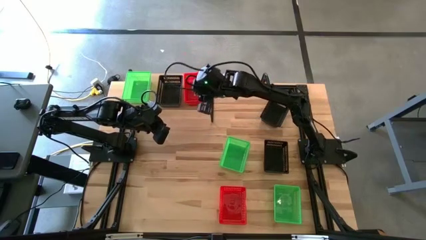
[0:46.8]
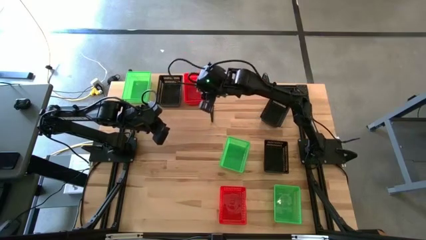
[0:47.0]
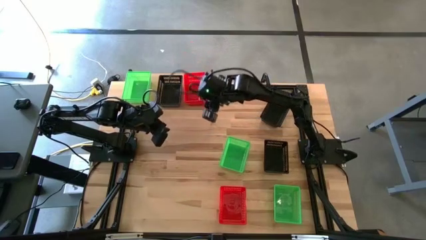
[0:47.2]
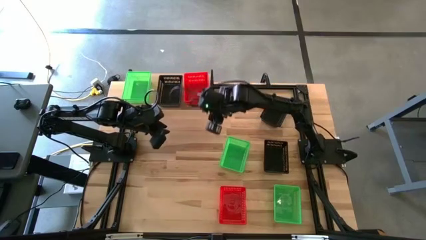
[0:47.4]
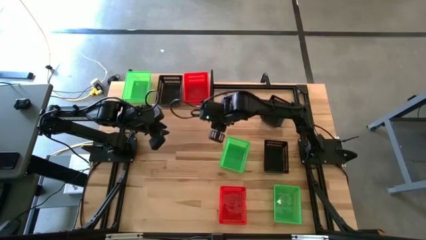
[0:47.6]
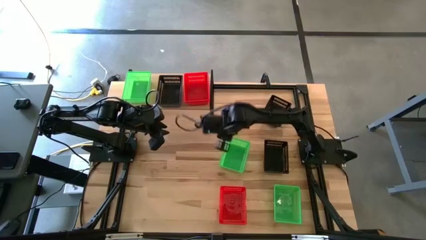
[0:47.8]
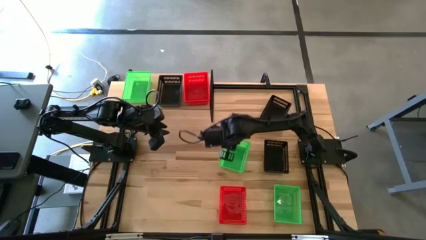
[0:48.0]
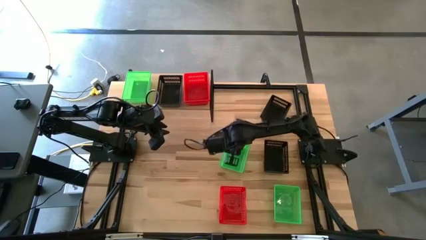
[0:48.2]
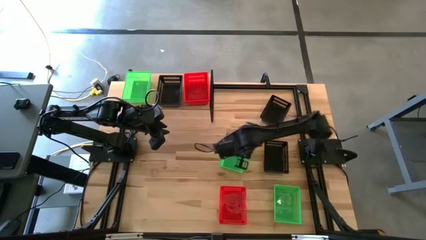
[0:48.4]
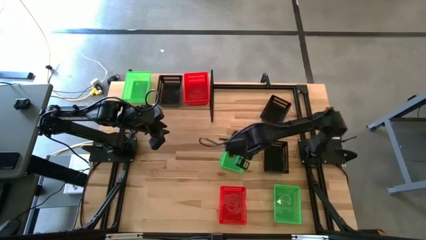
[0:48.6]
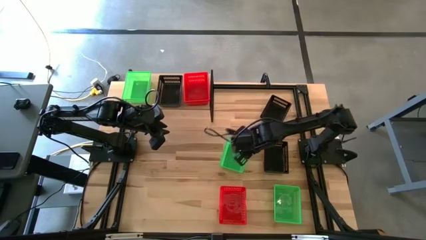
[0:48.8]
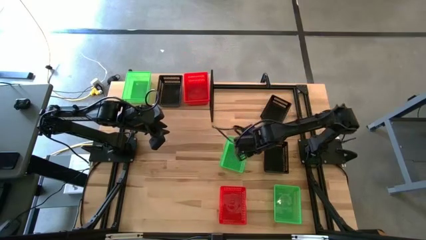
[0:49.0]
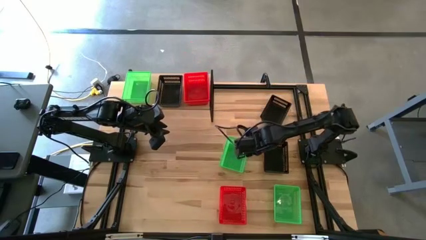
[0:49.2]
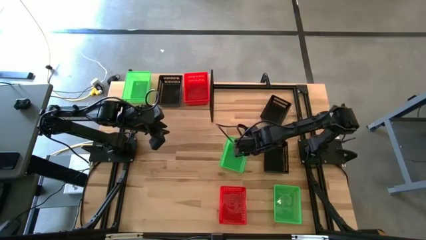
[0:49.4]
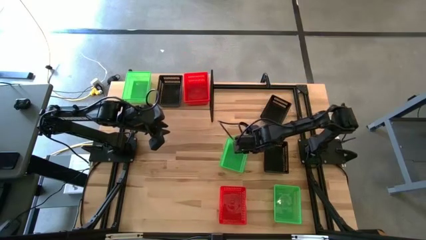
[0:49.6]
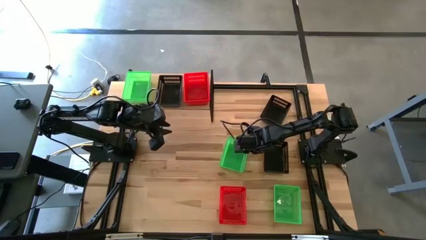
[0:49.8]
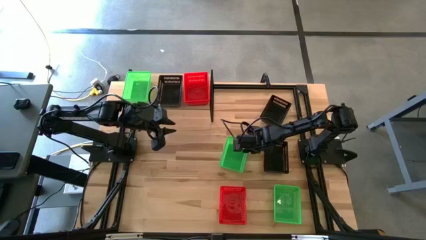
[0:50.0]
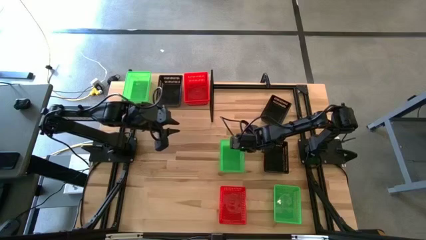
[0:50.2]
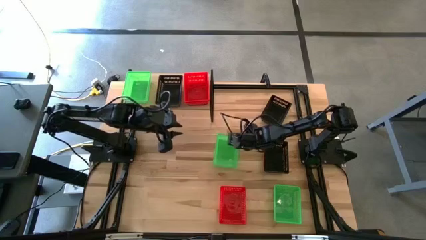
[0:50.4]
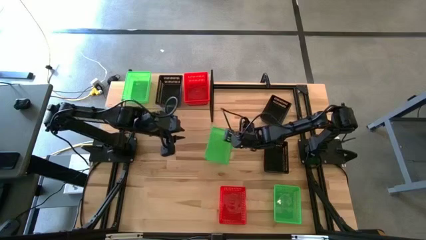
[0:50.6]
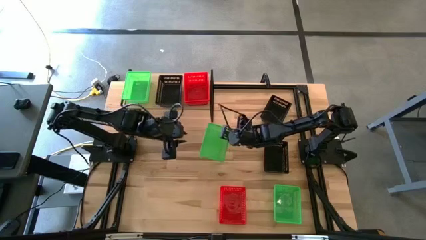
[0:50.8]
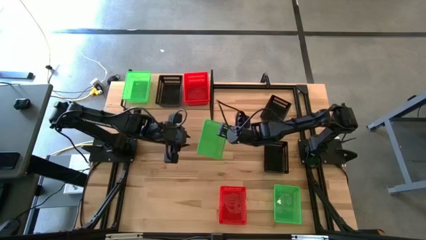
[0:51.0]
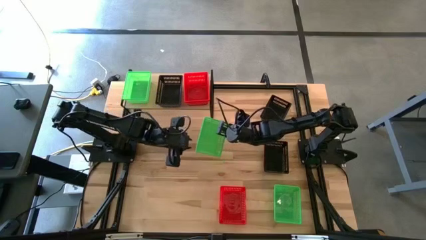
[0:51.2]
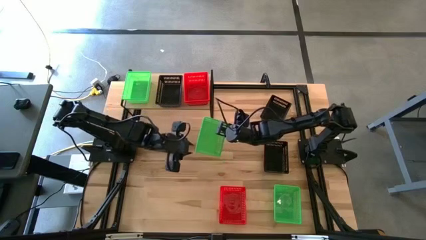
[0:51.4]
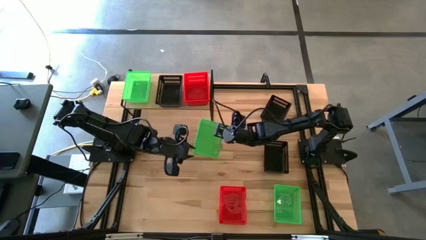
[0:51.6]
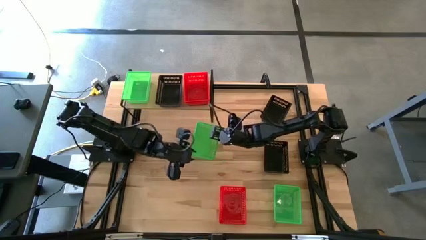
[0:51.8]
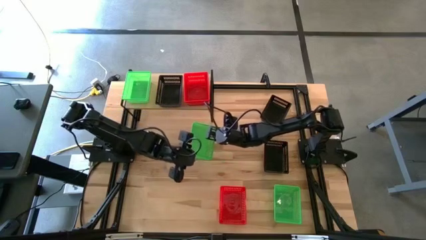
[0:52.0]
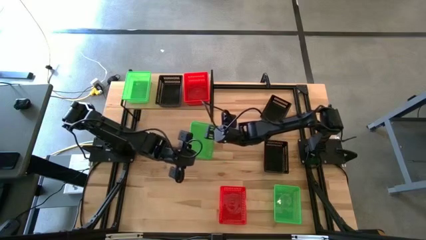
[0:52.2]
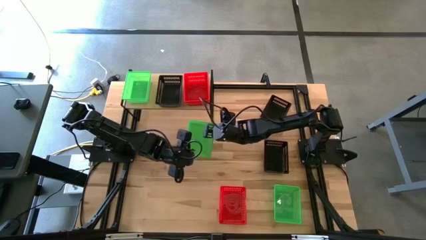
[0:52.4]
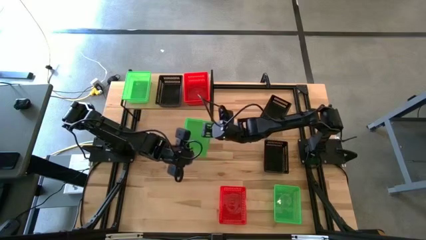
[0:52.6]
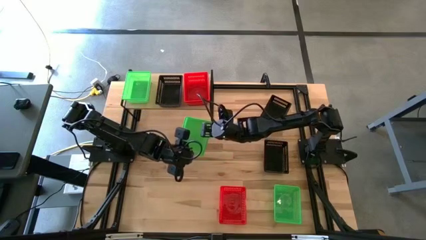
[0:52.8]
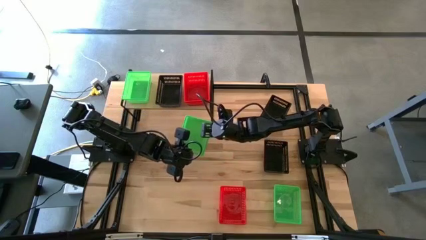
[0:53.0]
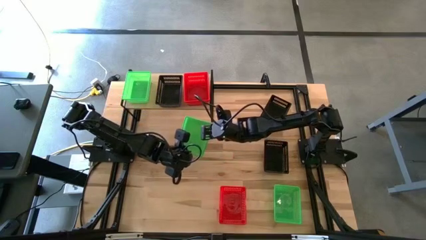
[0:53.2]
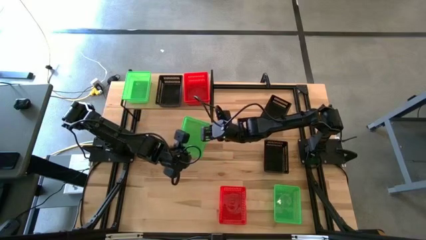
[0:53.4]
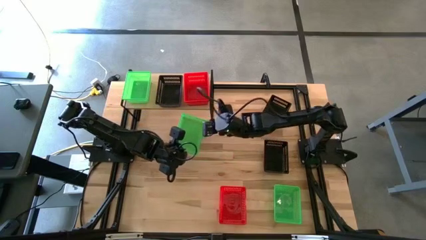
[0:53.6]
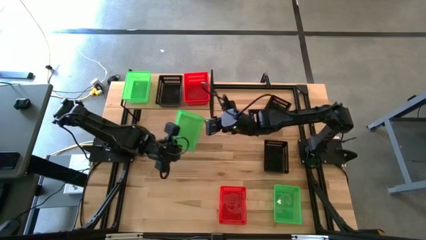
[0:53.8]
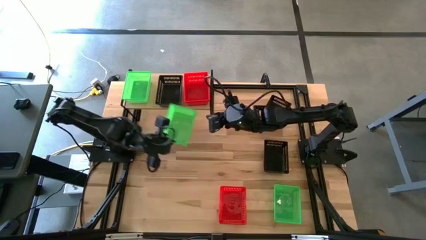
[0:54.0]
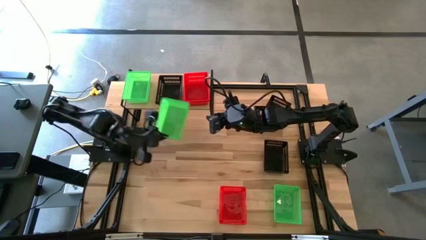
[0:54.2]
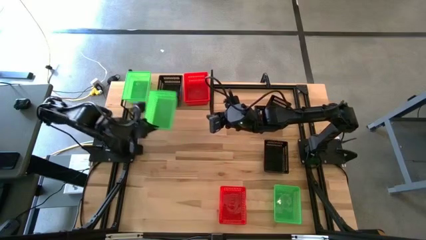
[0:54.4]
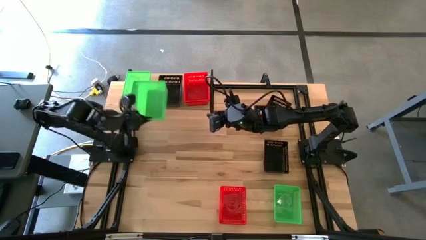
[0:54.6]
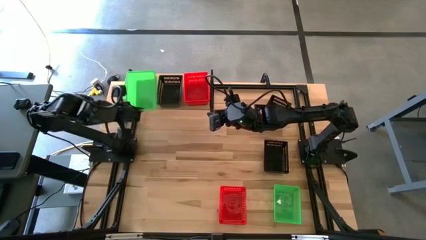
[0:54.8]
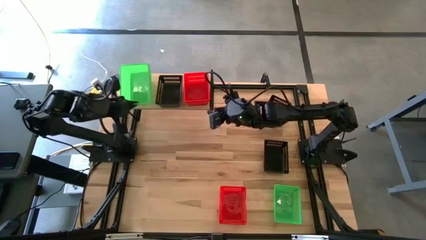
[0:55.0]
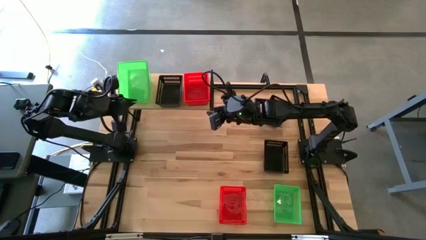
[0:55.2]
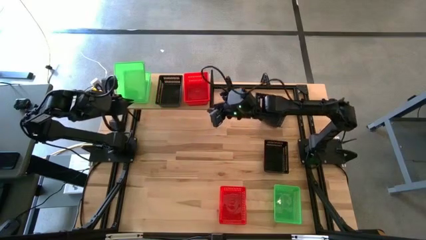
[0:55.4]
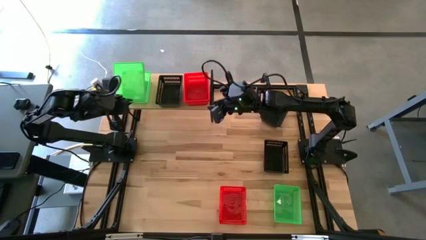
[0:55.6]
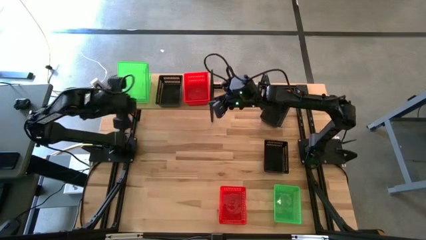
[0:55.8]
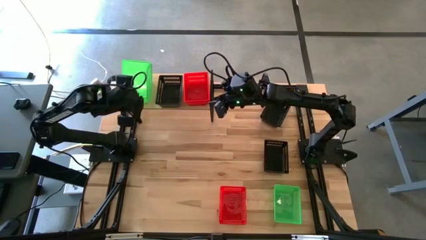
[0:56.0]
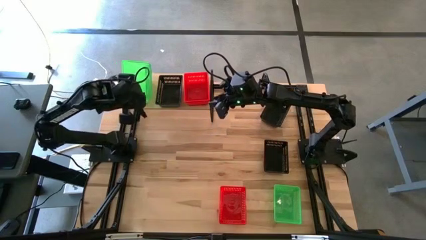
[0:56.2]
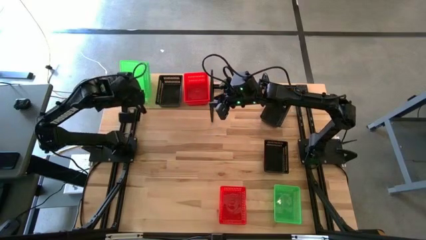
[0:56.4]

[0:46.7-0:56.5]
Task: Stack baskets on shelf by color
Stack the left green bin on top of the green bin on the shelf

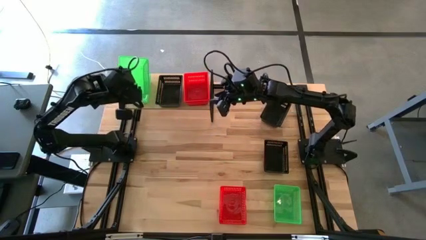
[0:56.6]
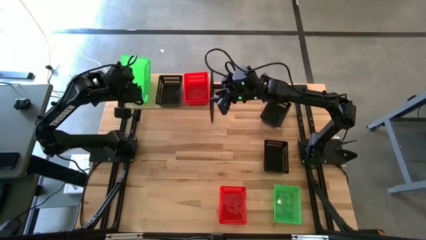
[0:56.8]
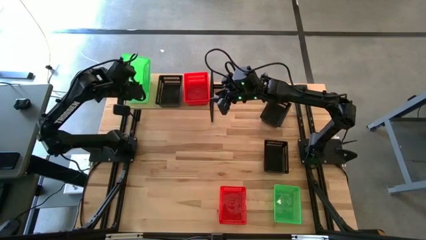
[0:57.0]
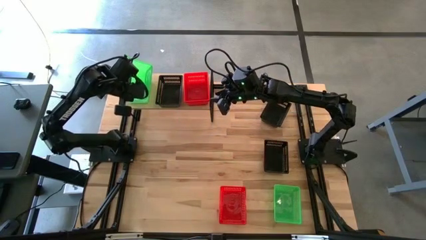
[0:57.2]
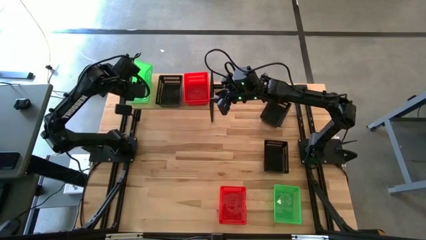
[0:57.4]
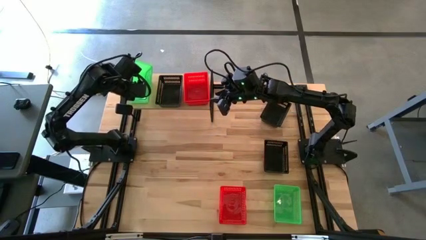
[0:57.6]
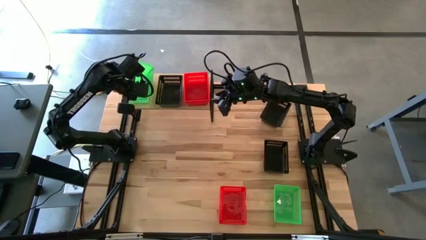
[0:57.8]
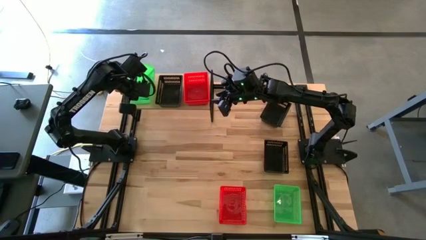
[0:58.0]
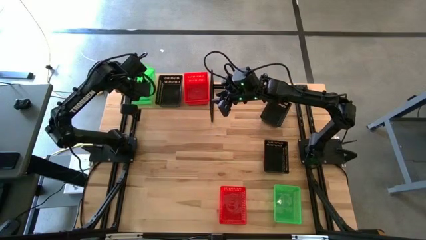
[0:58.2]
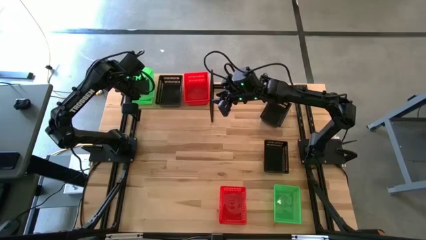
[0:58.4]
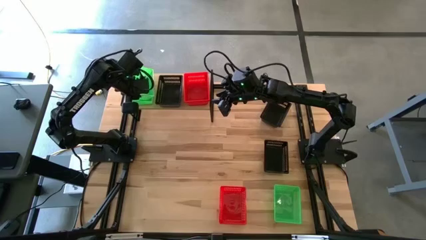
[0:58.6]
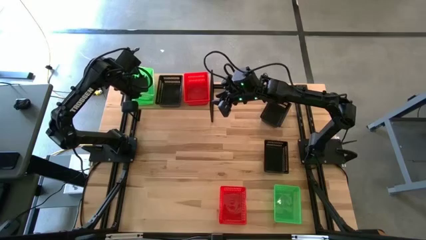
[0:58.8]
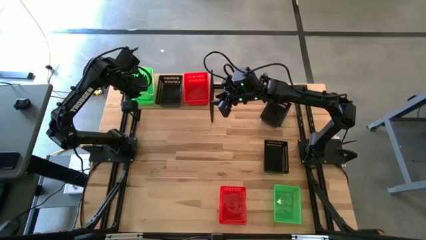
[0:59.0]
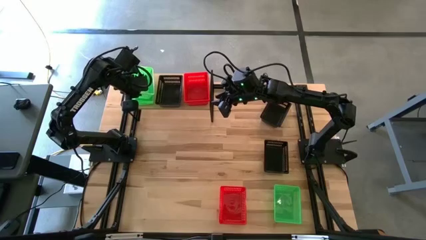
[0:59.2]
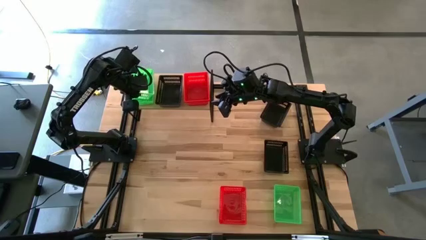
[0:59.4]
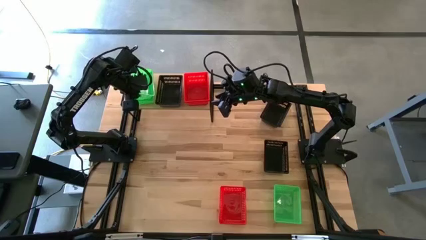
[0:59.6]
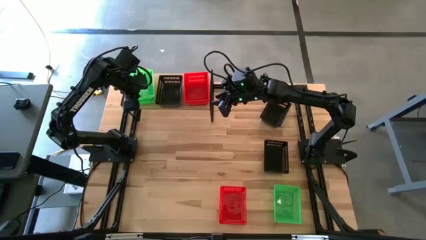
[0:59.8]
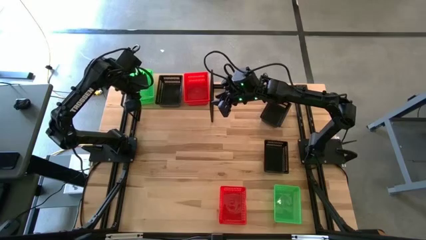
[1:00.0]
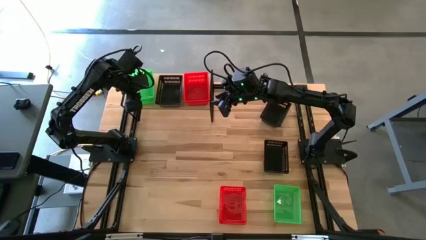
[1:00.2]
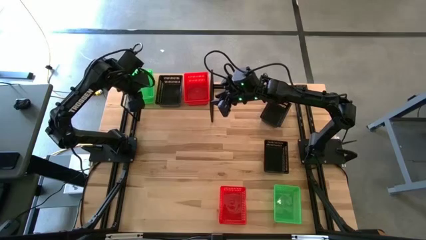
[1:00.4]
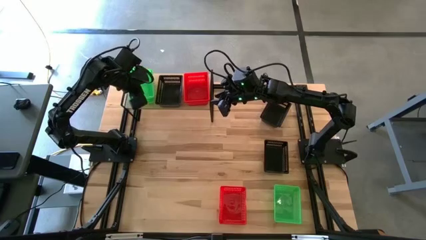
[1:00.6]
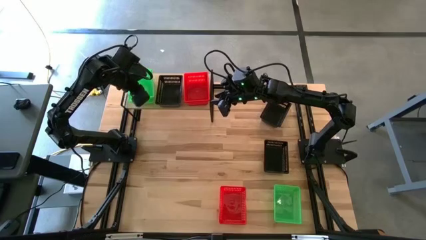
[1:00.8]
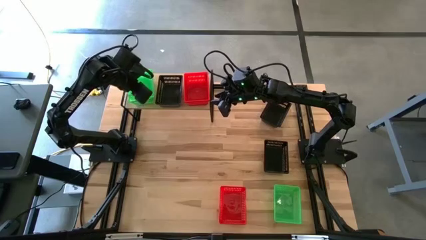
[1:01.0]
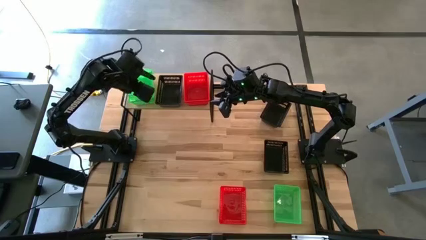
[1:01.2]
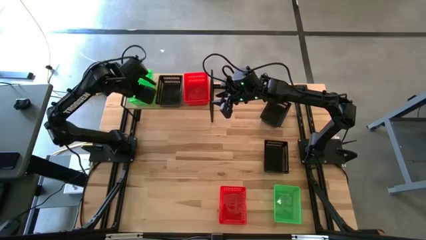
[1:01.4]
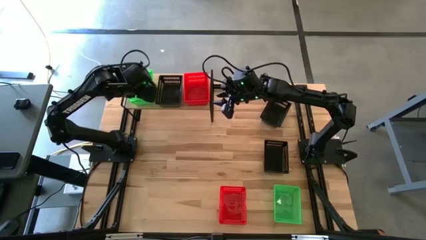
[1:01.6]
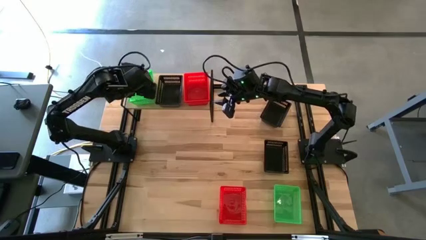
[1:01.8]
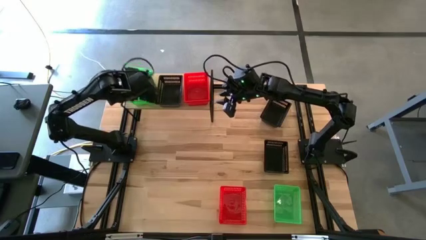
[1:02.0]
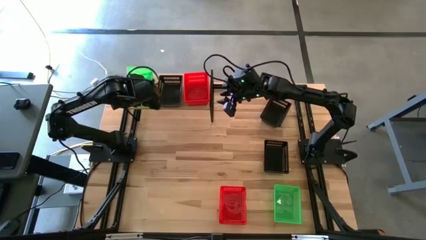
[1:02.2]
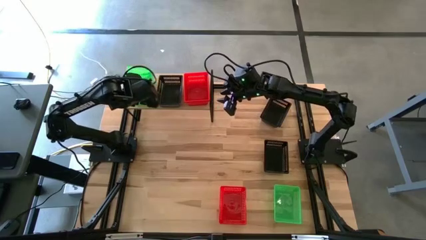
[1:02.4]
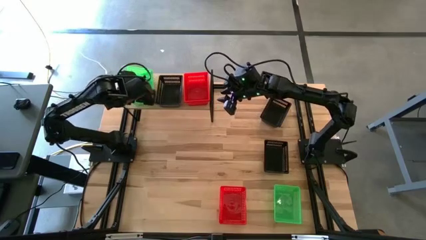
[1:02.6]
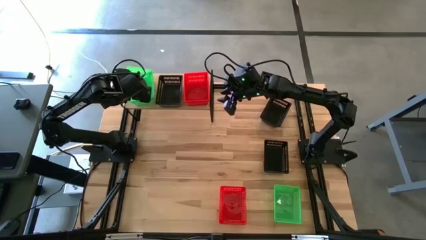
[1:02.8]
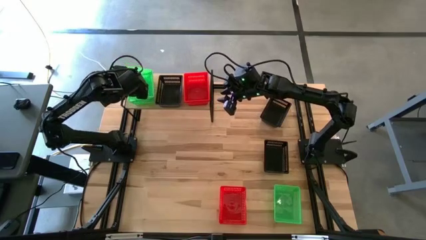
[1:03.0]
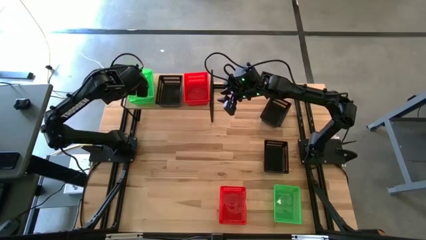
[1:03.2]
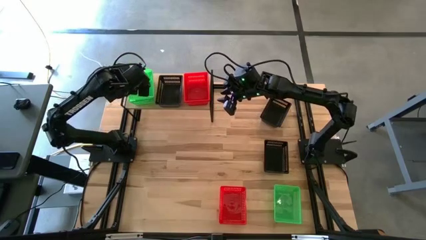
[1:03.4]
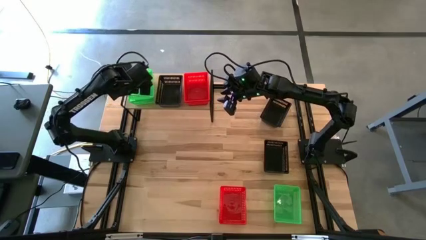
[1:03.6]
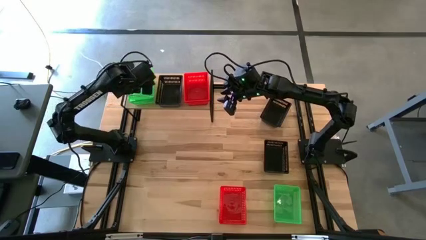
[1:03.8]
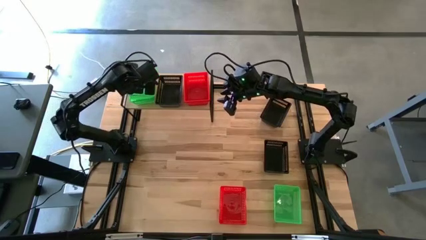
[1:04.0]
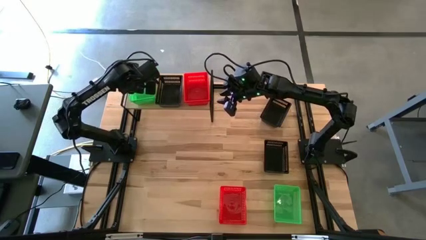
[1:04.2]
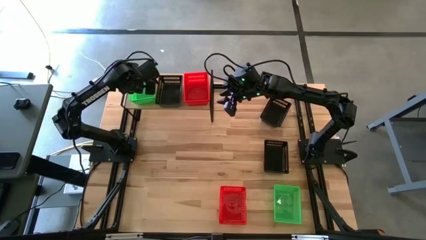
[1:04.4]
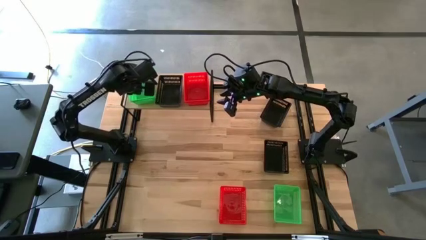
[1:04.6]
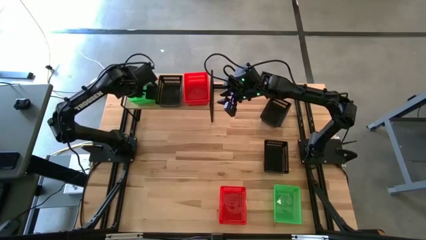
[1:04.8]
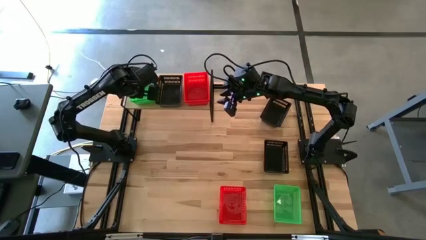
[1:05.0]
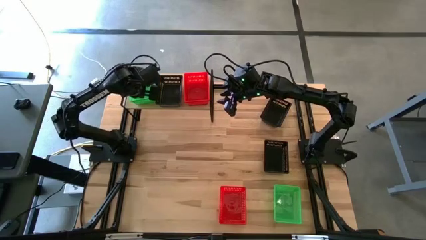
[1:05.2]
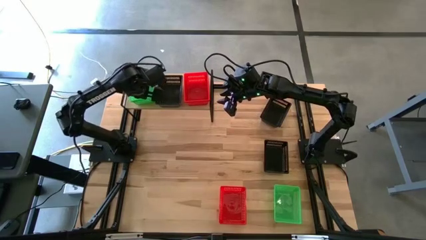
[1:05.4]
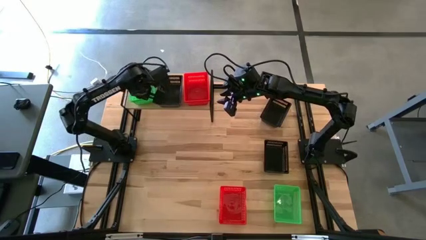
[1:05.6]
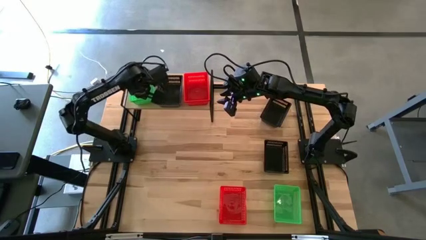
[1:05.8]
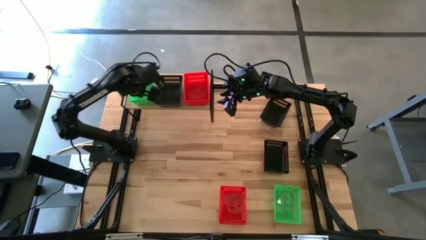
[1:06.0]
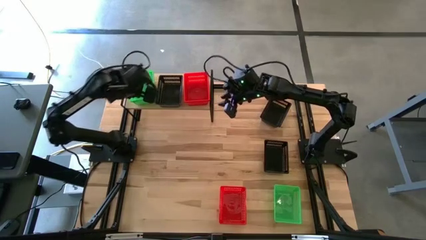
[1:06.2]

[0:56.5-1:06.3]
Stack the left green bin on top of the green bin on the shelf
